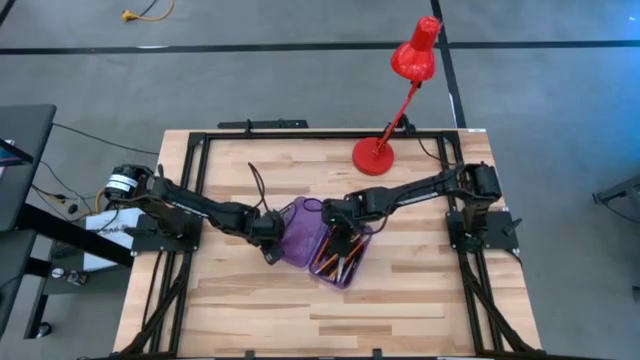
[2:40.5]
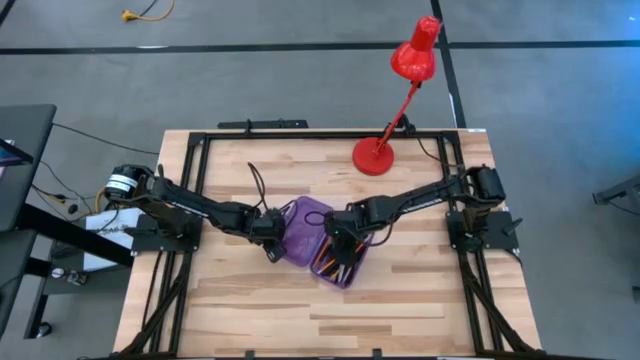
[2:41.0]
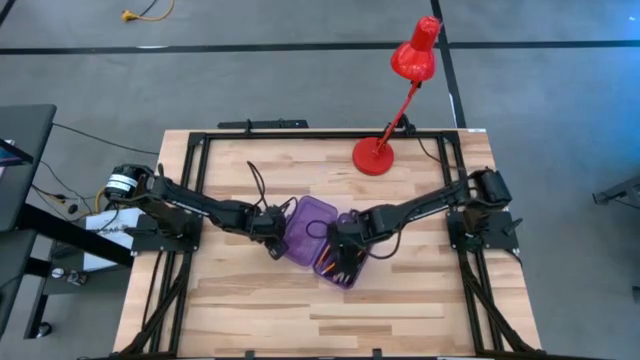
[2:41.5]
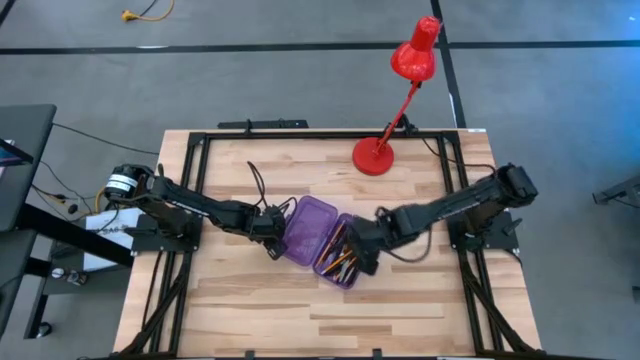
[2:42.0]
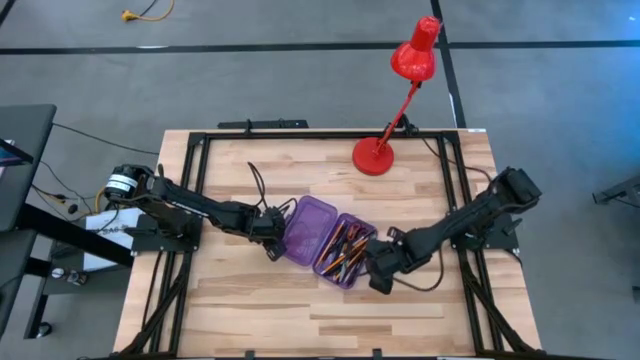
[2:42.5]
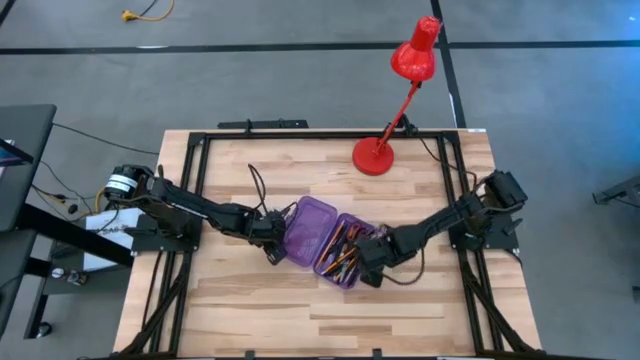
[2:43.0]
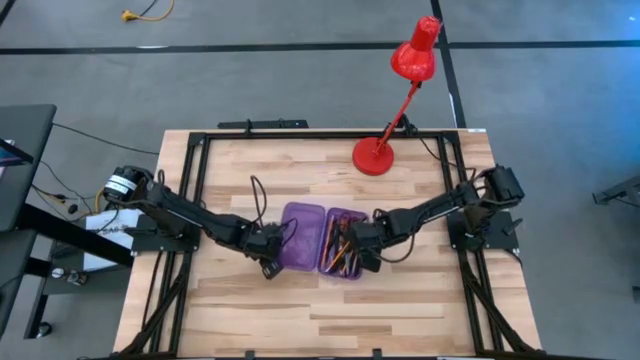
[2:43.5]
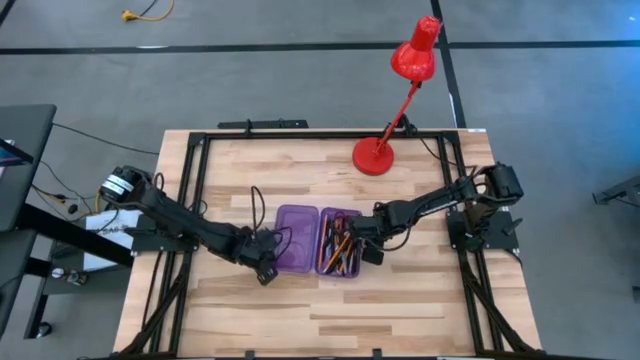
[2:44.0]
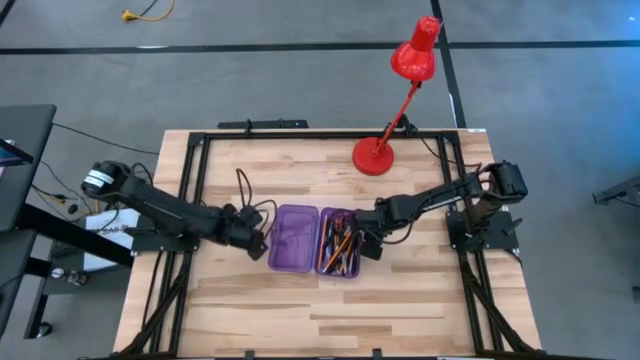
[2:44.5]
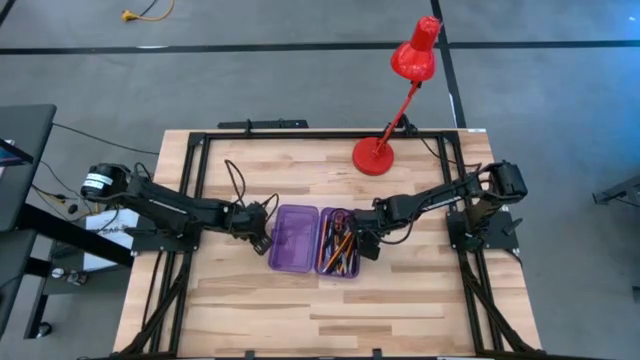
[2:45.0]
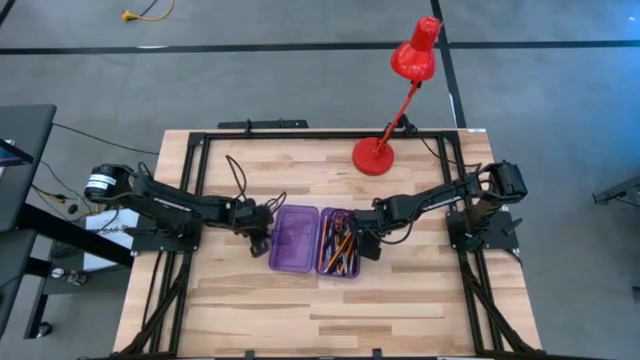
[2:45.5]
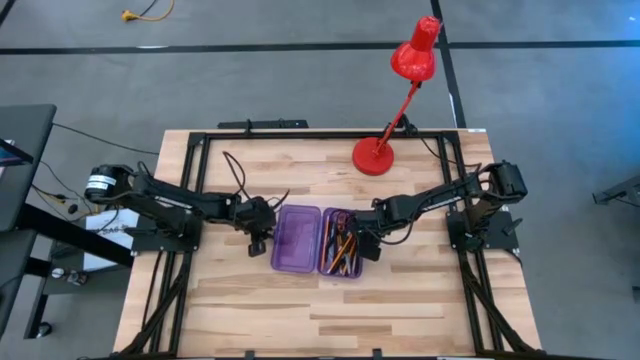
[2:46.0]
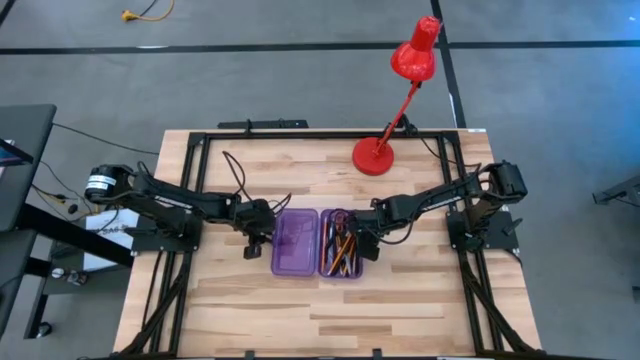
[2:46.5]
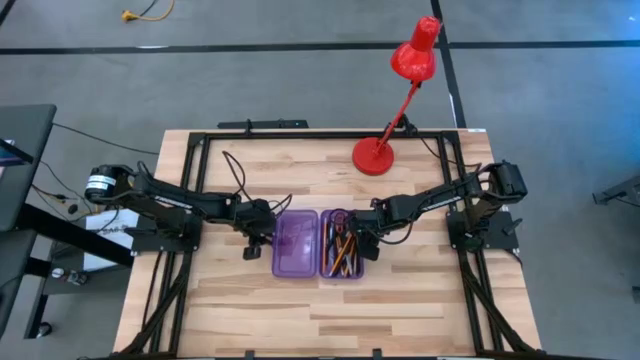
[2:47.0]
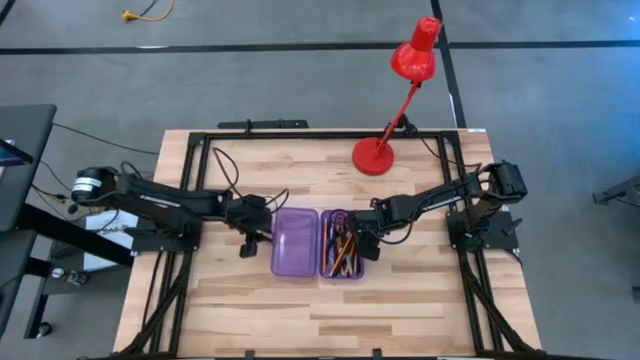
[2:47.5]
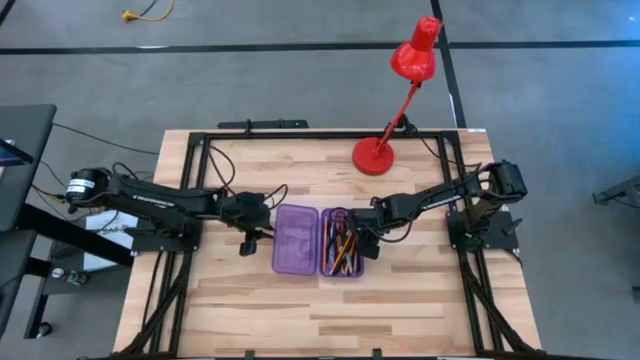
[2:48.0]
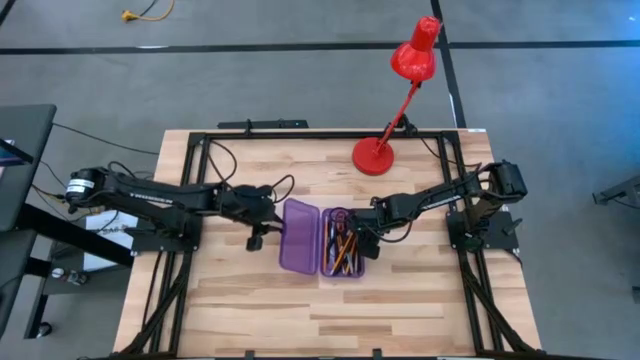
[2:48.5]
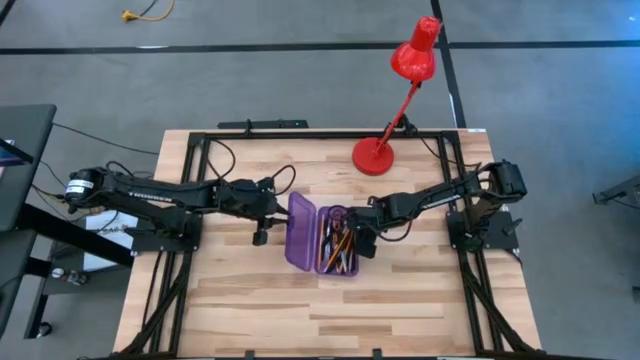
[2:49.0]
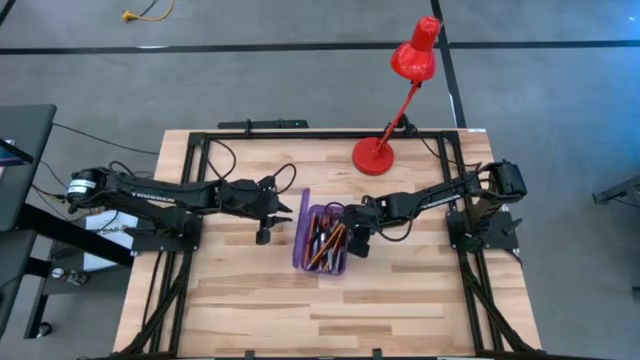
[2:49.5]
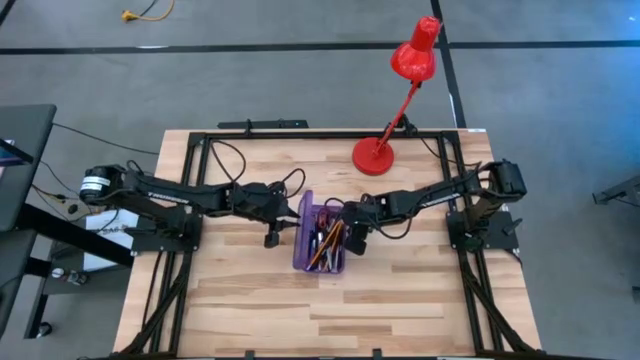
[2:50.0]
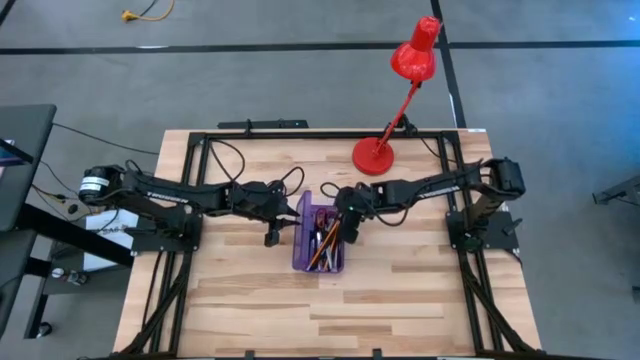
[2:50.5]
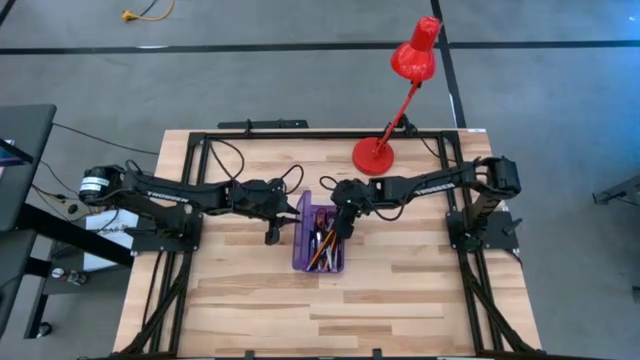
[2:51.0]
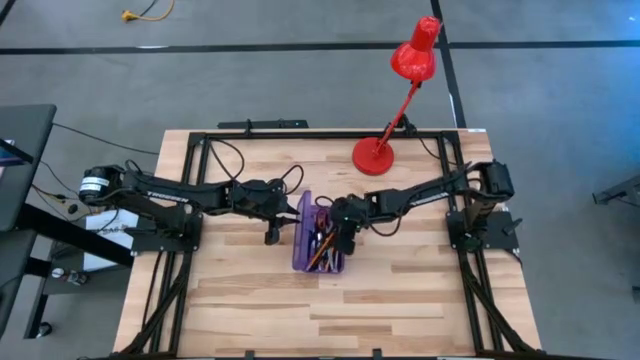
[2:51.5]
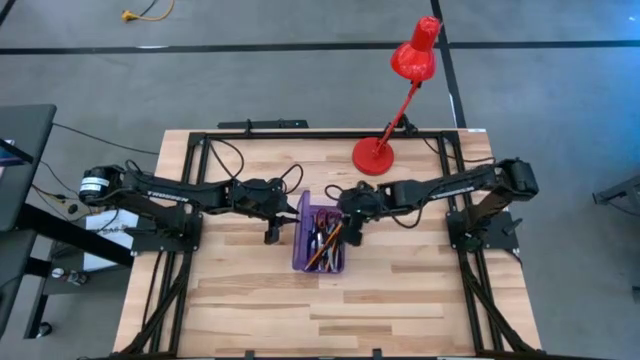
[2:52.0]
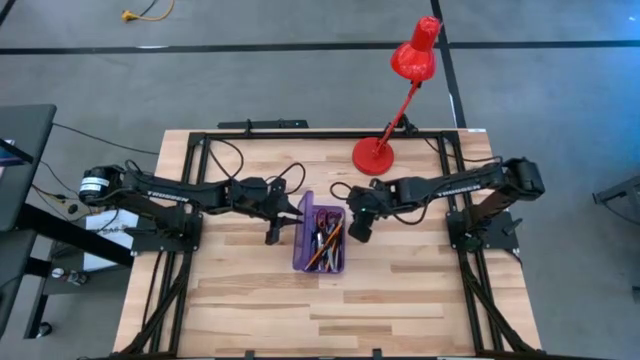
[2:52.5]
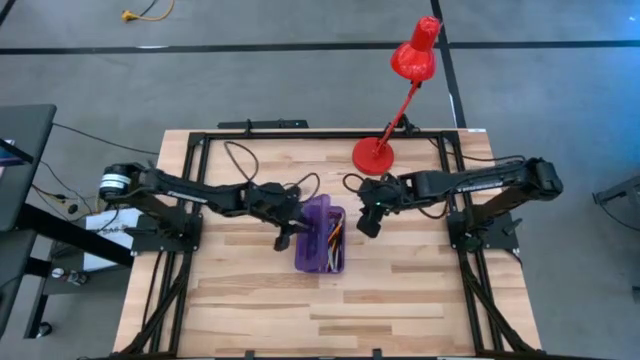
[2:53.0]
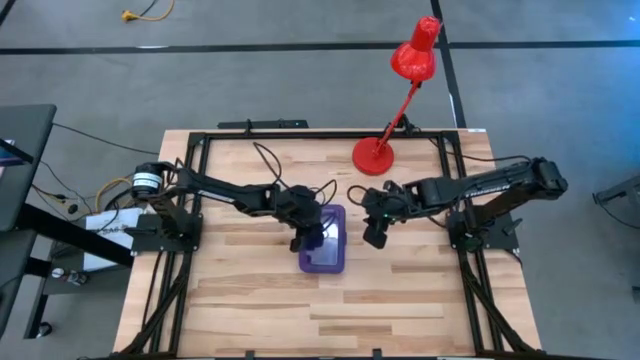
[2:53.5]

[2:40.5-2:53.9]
Task: Pick & place school supplies into a supply box
Close the purple supply box

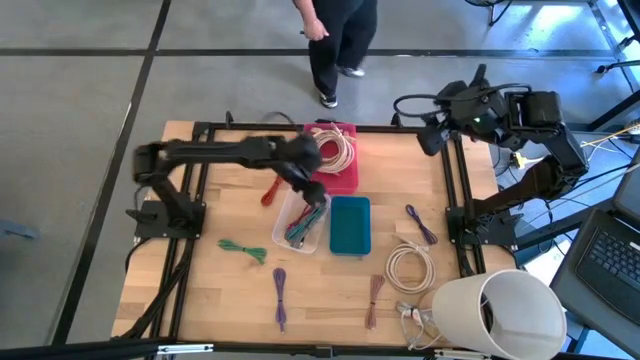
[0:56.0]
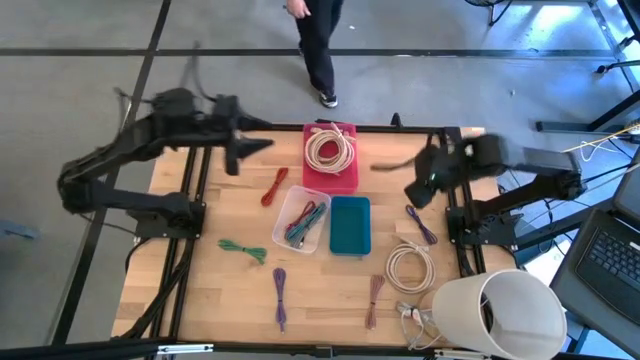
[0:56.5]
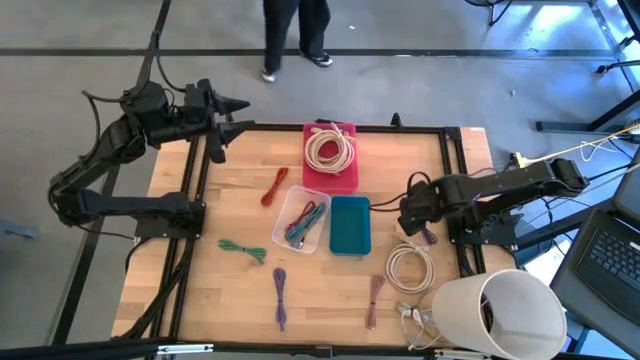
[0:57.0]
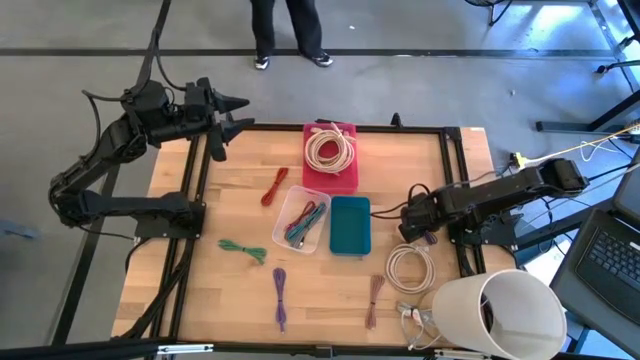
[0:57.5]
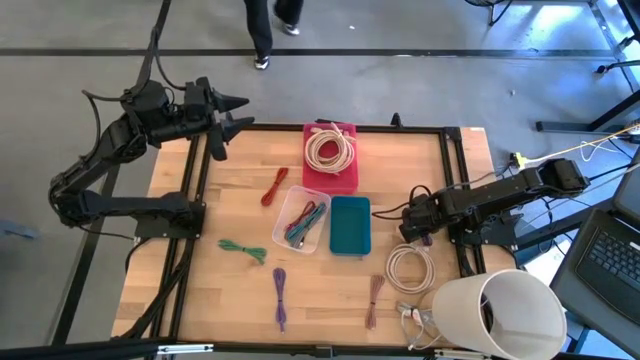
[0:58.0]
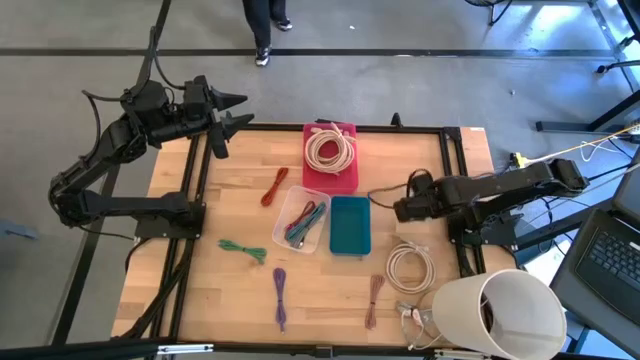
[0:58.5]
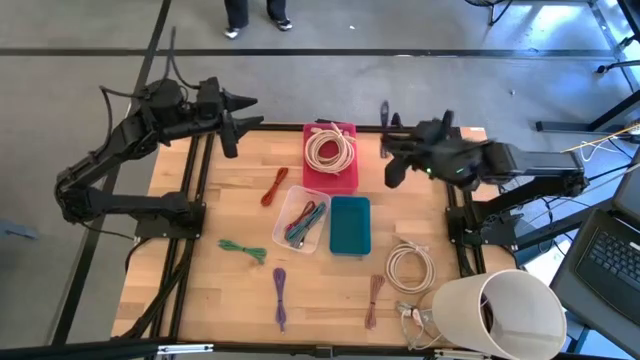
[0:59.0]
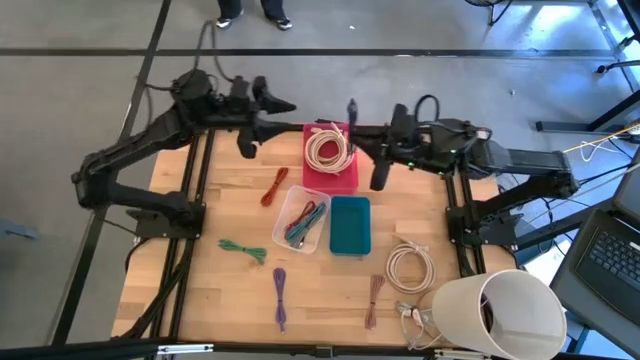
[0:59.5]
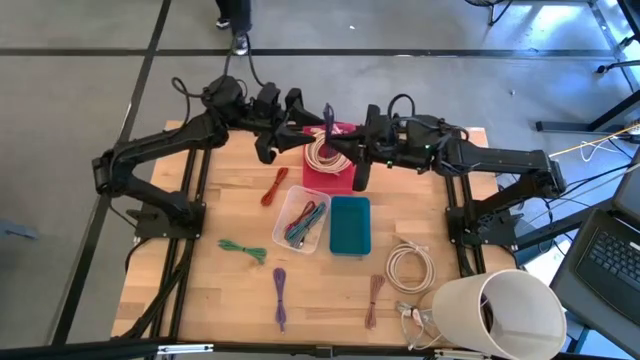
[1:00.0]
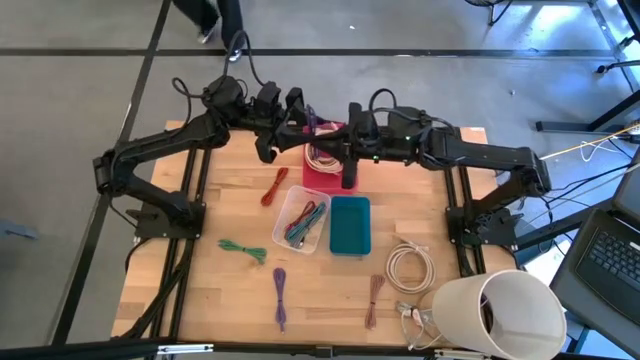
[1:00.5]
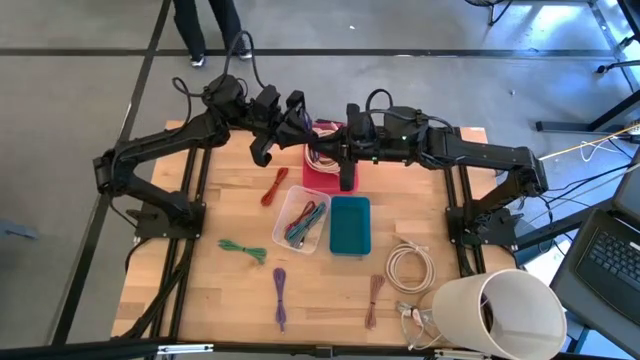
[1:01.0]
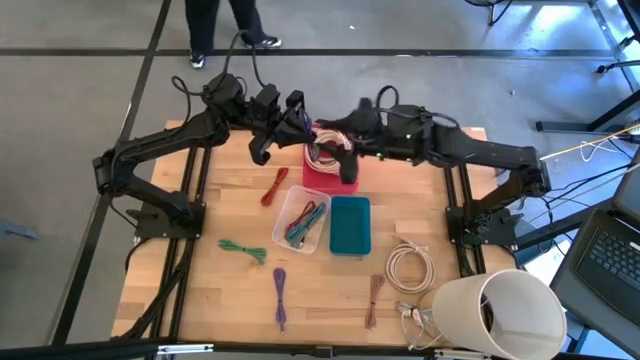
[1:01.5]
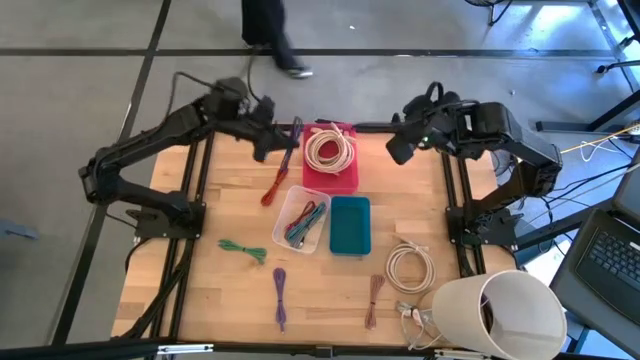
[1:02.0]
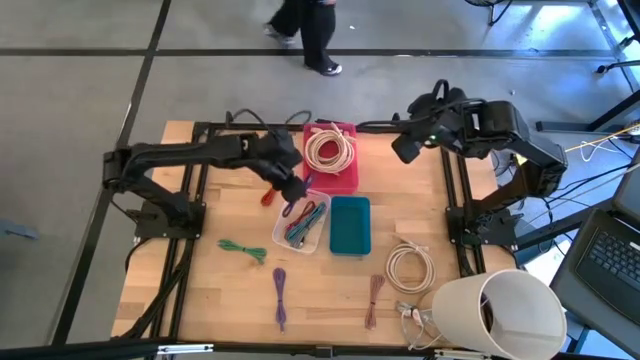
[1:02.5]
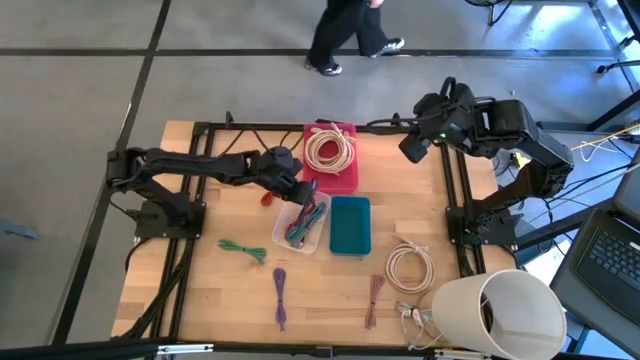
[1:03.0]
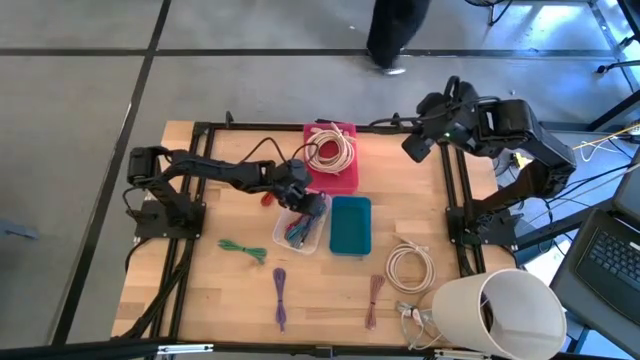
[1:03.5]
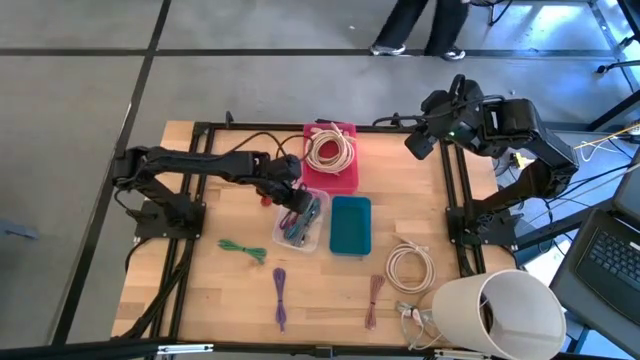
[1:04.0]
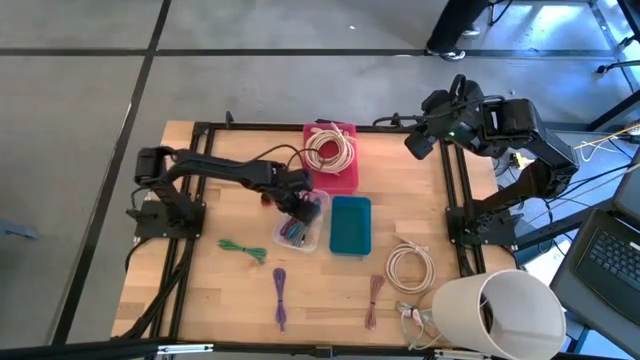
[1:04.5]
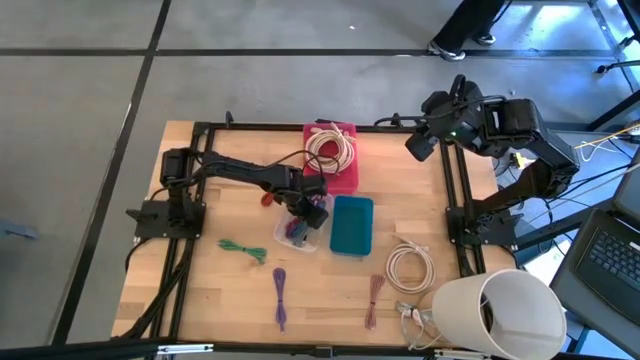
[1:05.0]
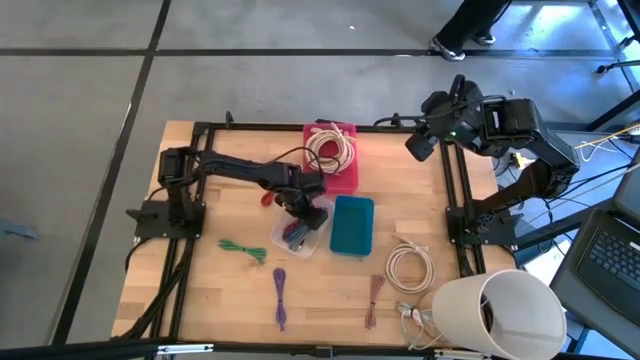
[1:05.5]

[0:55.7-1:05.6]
Task: Pick & Place USB Port
Put the black and violet charger cable into the transparent bin
